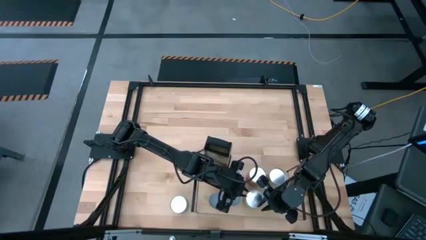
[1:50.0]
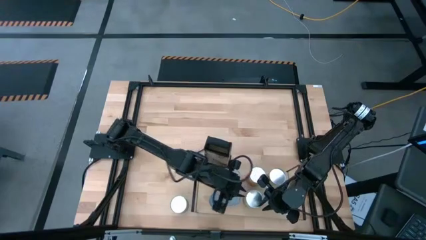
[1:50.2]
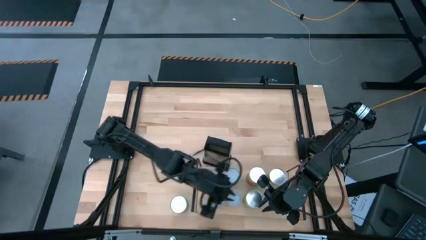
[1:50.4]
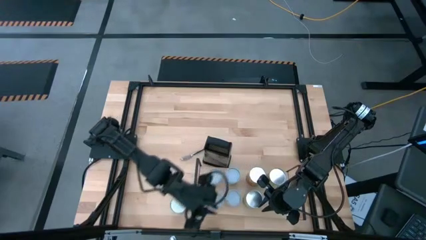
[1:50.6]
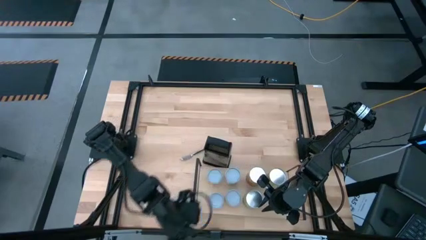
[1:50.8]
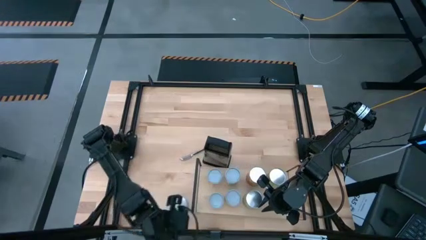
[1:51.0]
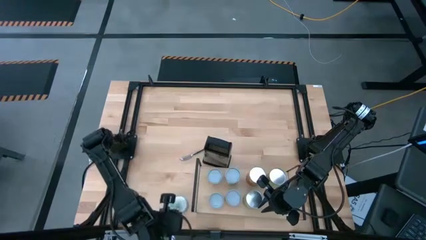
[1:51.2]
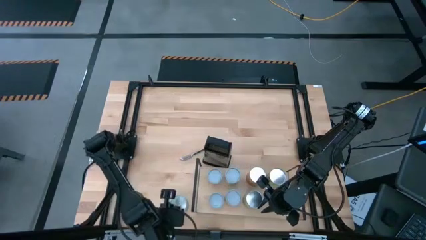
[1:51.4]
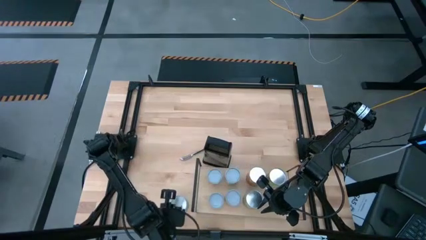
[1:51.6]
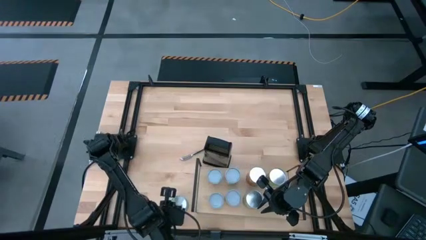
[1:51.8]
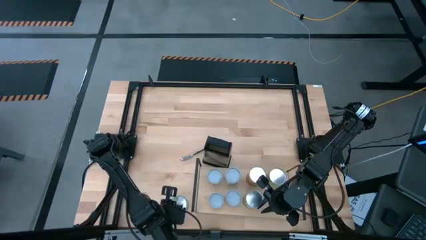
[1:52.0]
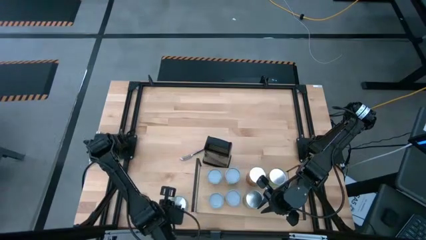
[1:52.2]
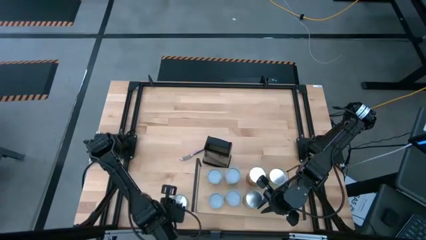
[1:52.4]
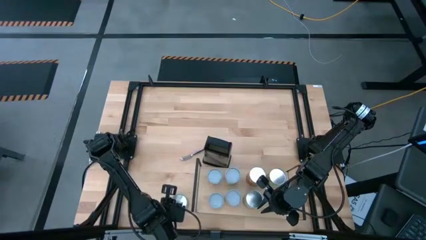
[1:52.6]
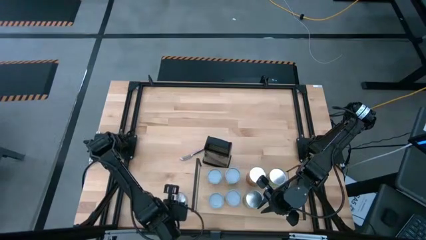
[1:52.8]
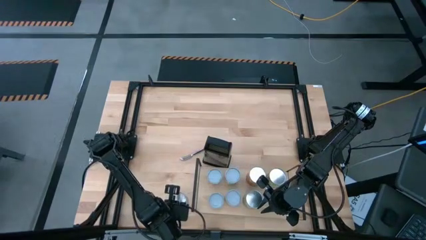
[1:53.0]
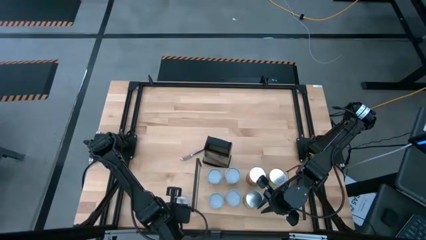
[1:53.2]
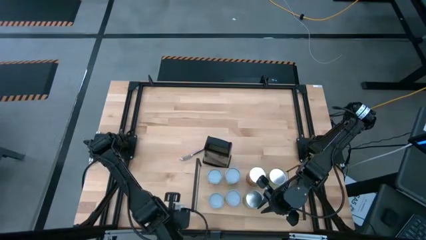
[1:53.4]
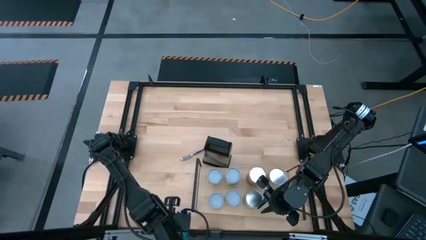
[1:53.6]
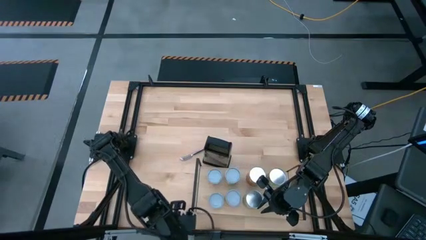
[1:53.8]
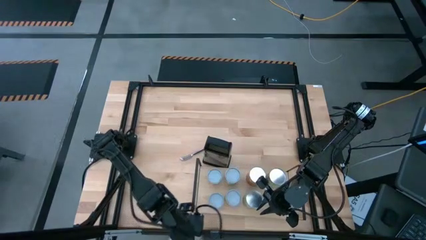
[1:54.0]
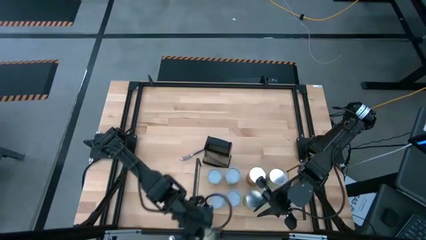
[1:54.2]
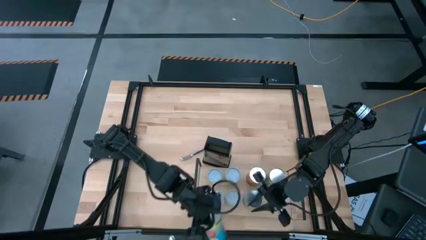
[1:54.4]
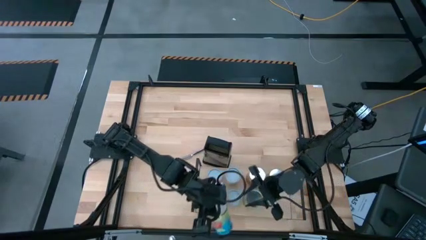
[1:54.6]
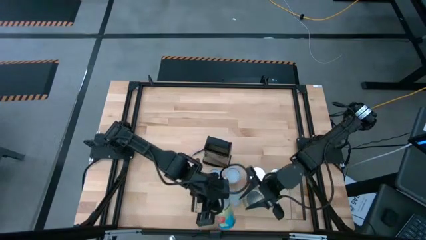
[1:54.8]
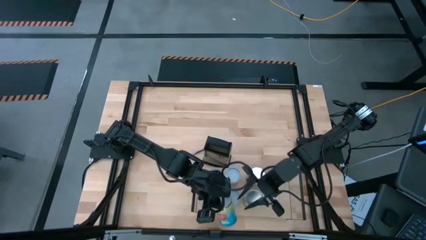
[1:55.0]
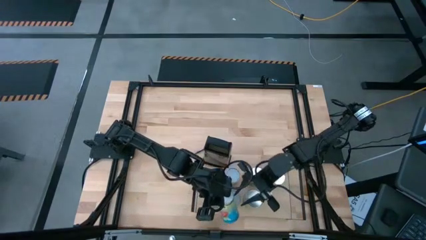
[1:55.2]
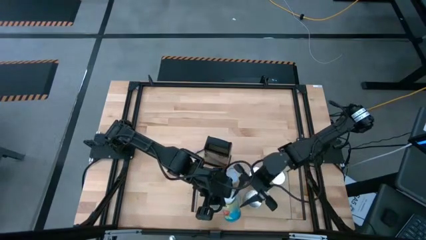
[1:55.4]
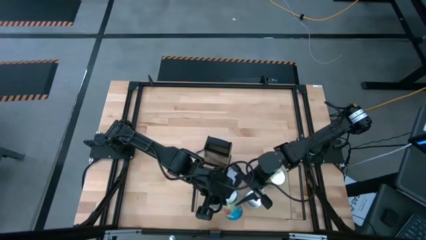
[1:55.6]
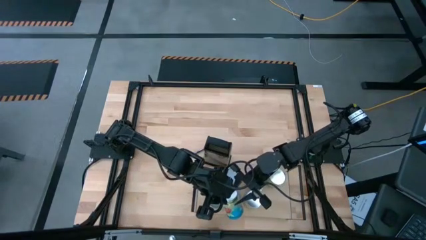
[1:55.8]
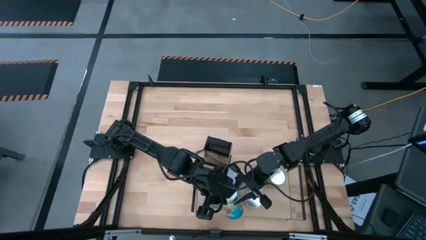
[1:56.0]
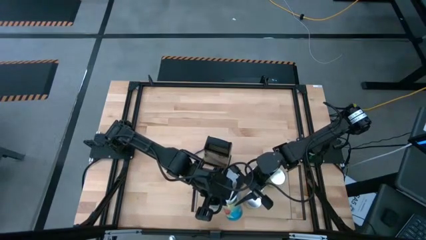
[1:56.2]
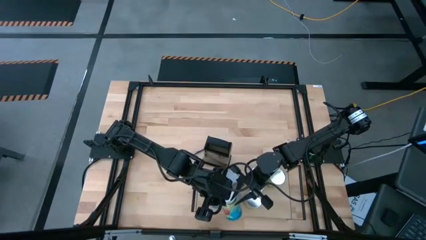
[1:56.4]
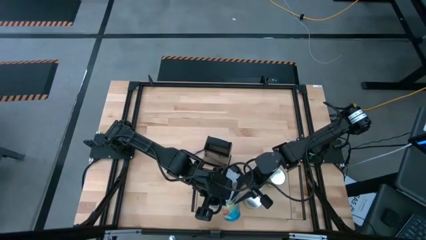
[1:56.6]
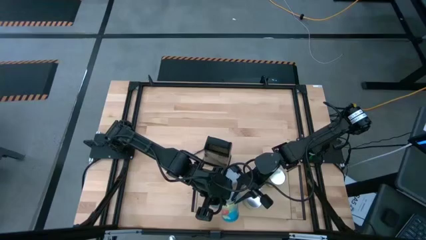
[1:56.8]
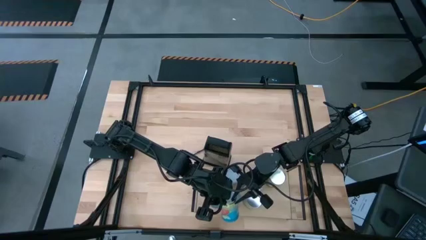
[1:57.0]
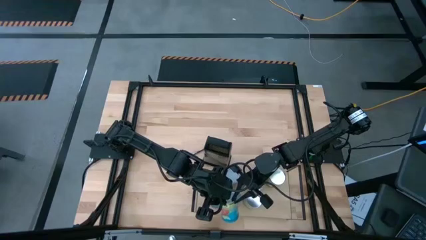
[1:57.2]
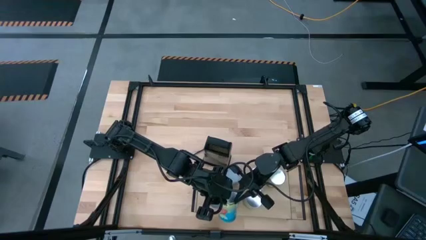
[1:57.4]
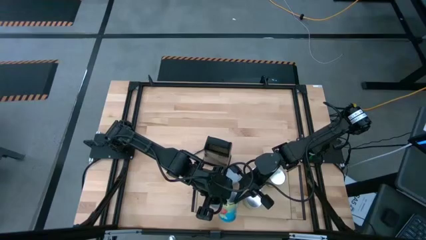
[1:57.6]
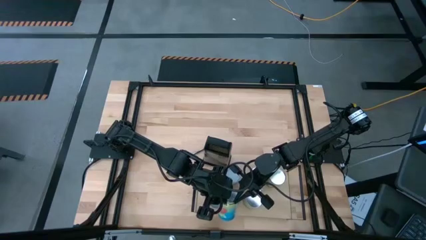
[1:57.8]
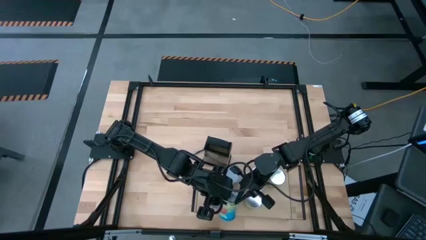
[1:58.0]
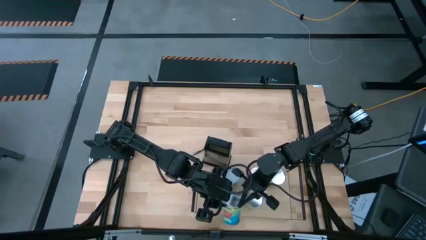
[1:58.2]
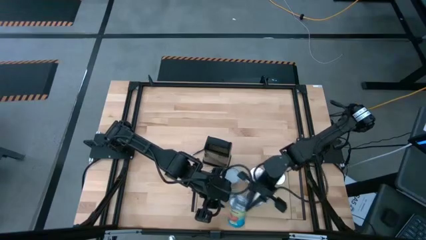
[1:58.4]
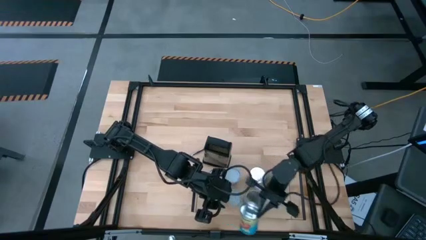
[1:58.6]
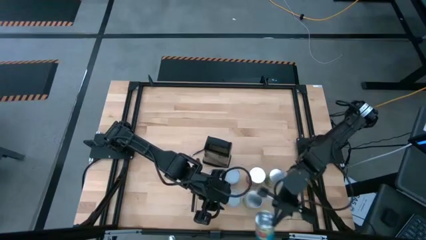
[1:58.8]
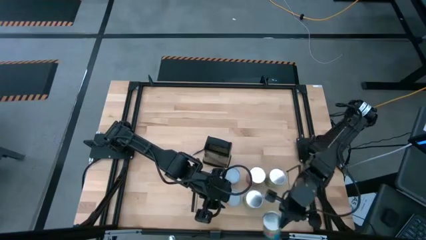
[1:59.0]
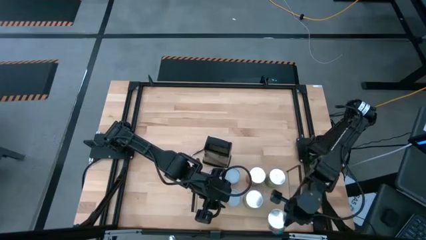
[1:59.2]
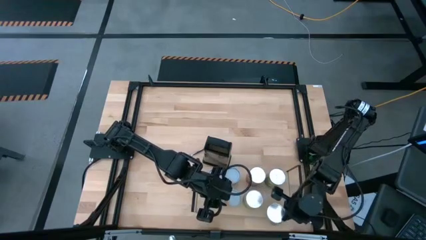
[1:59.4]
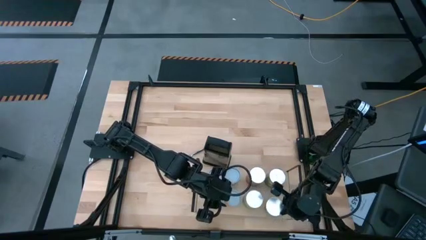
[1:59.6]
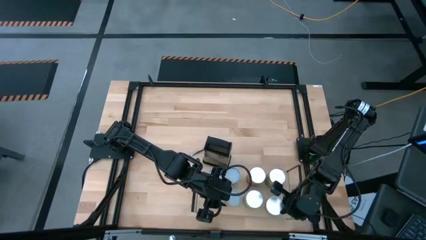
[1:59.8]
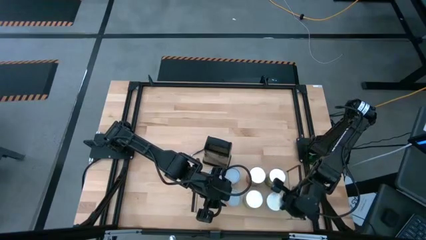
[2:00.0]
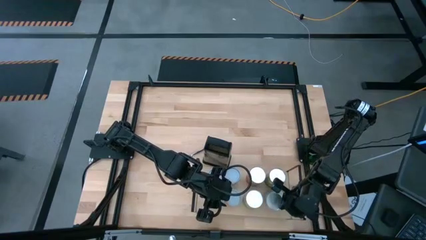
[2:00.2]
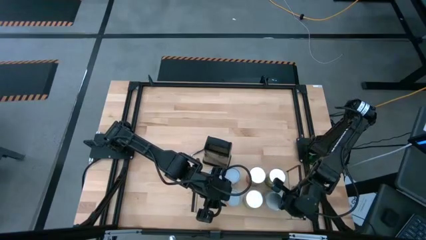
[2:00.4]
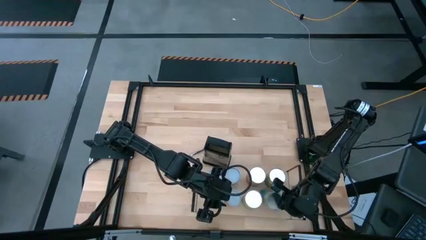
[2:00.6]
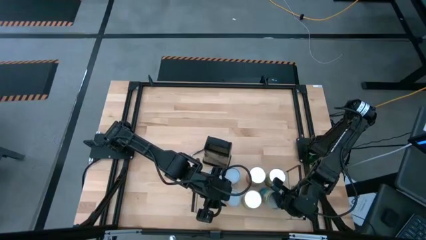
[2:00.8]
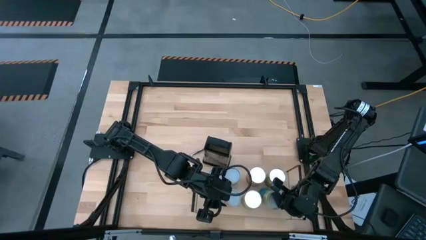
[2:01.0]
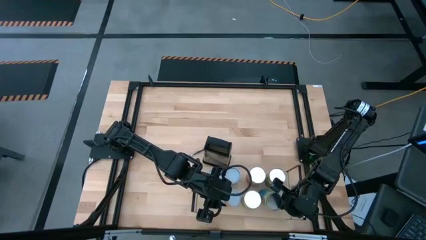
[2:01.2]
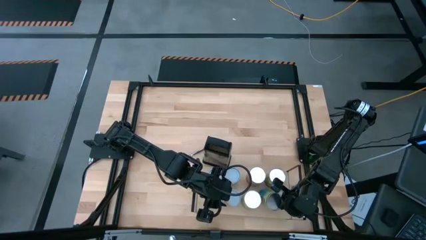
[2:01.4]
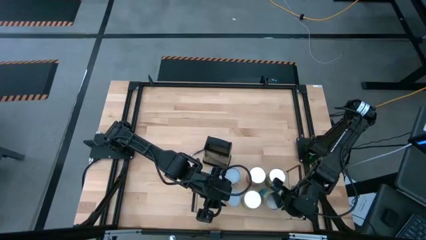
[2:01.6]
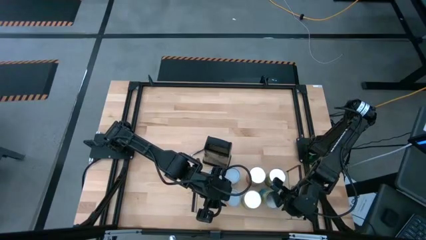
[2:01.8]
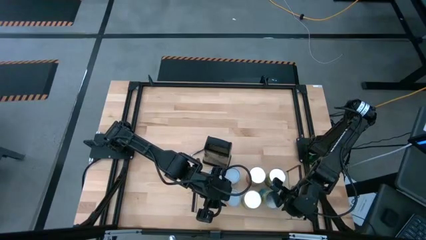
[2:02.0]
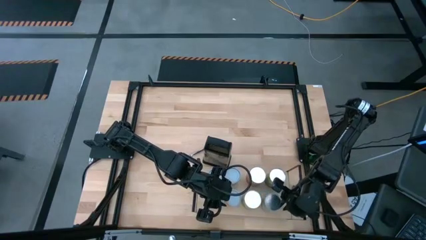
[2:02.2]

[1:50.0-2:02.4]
Task: Pick and place cans onto a shelf
Put the canned tomatoes on the shelf

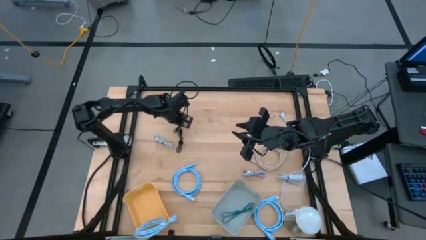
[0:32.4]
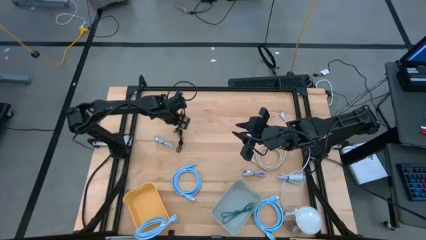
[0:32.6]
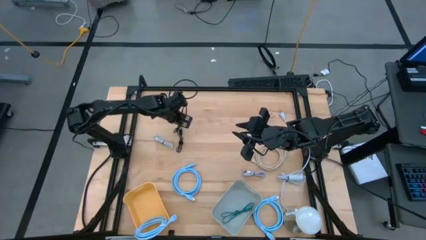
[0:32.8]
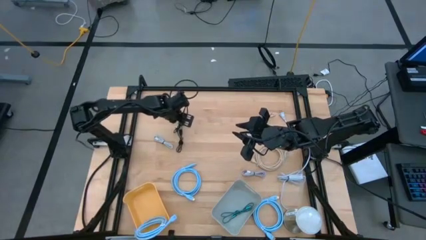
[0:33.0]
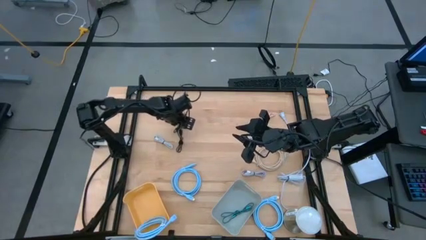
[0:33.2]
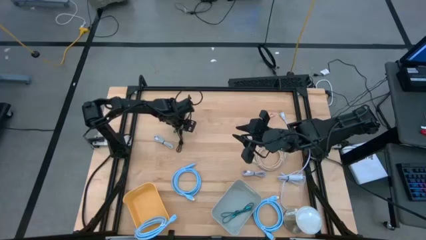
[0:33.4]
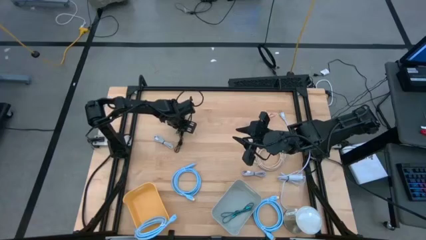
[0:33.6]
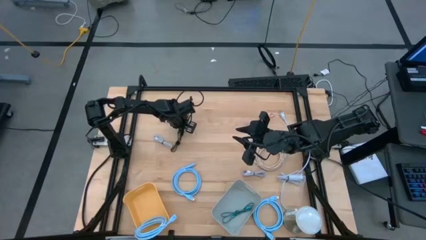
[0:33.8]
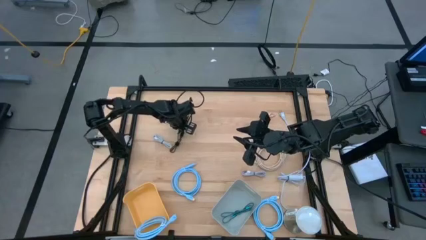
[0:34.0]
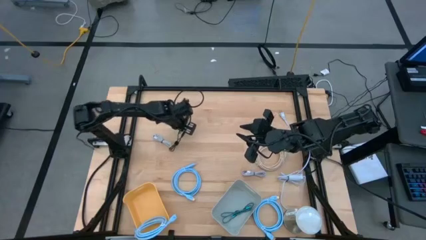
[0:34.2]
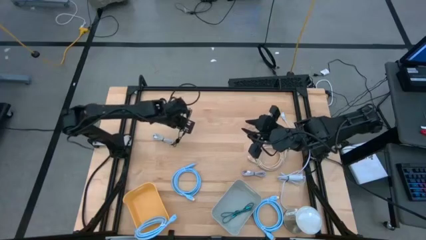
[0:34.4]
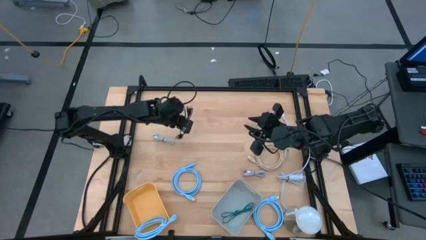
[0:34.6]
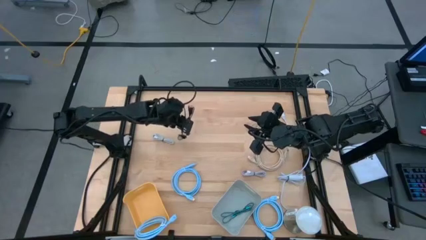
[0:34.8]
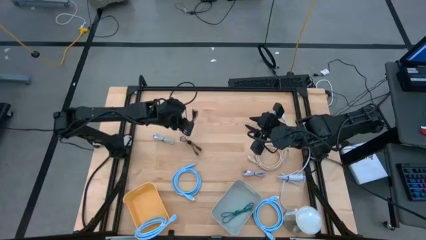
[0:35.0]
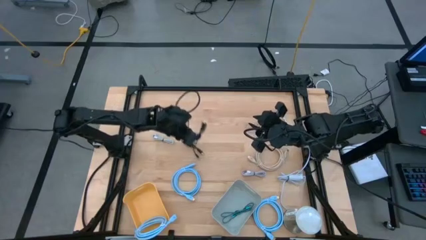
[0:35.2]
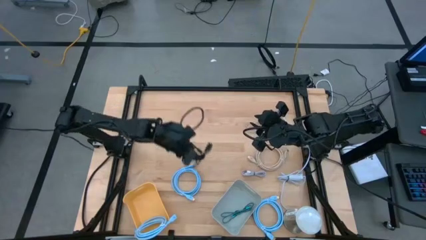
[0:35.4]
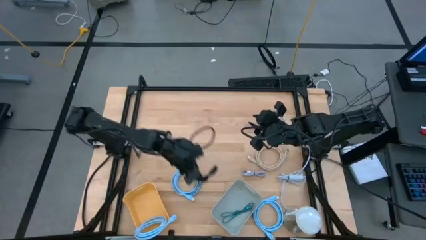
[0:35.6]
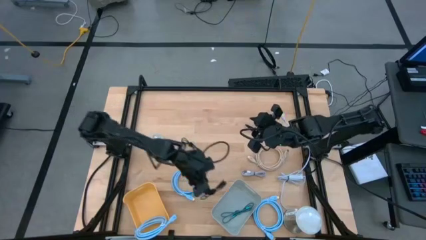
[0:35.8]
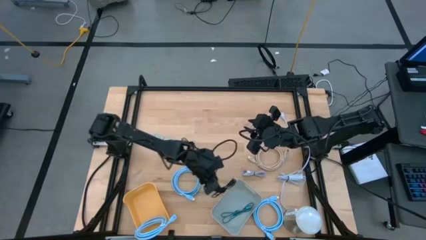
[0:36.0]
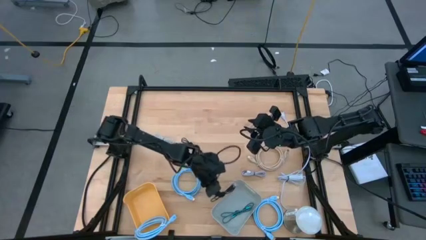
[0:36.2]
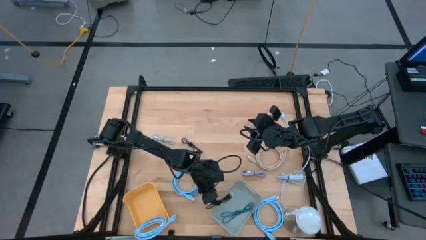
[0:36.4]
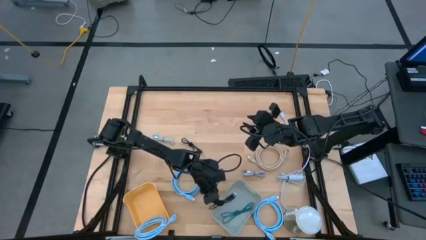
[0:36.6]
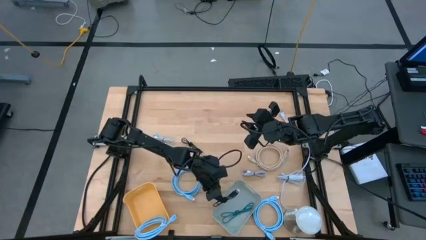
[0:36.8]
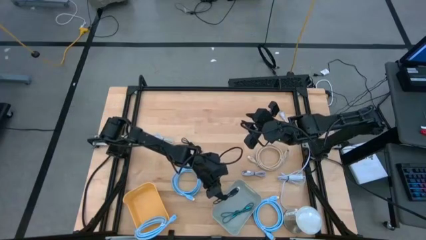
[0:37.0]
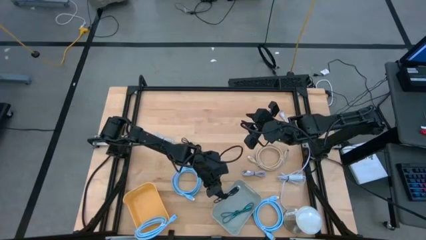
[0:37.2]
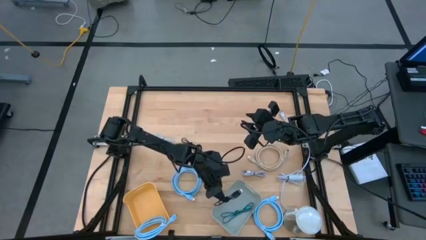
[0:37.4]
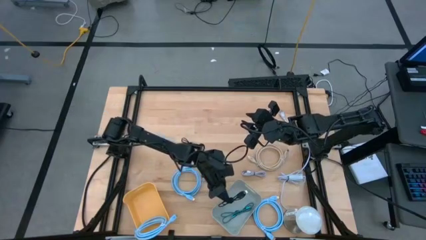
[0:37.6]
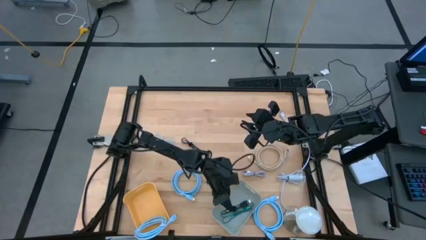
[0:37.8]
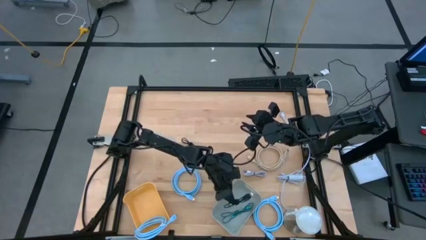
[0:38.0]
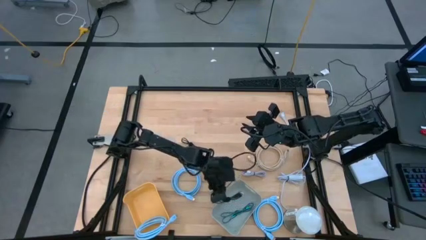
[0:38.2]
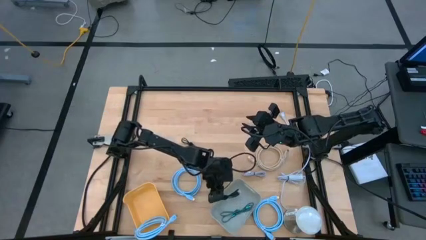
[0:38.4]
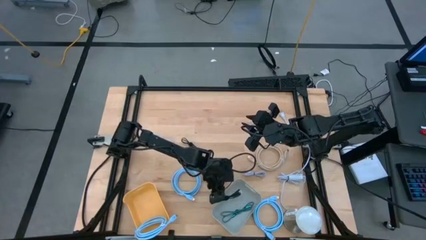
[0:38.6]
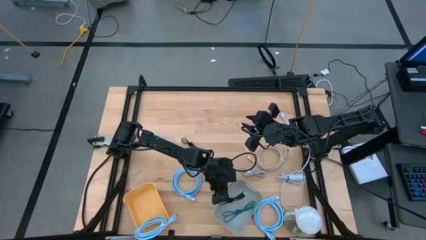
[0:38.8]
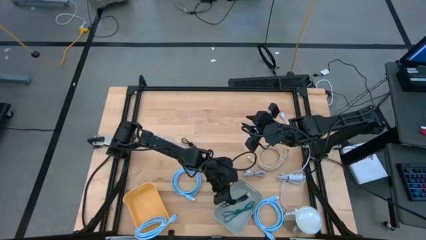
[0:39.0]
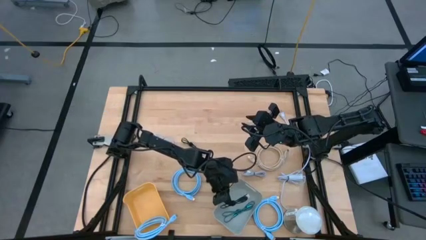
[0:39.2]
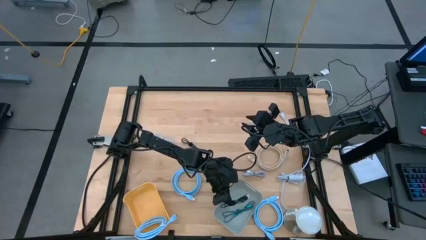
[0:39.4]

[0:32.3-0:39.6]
Task: Sort cables
Put the top black charger cable into the gray bin
